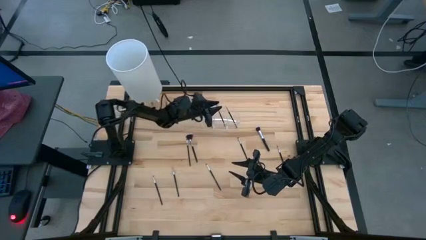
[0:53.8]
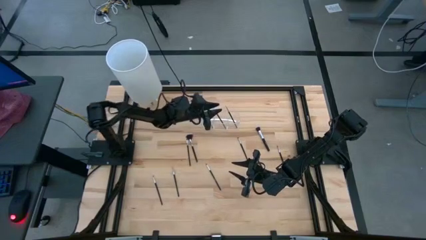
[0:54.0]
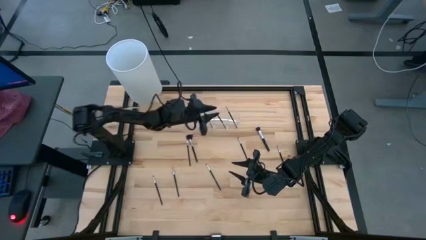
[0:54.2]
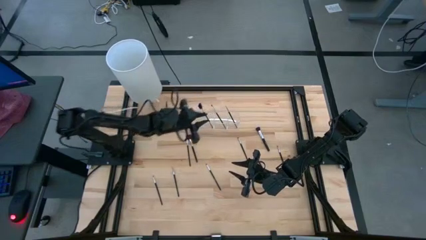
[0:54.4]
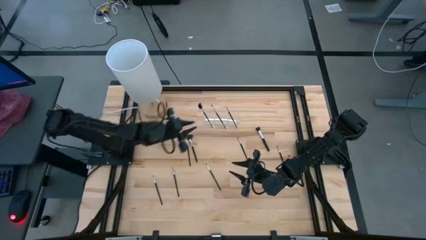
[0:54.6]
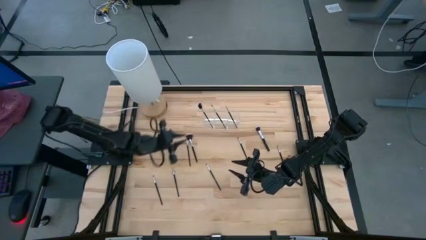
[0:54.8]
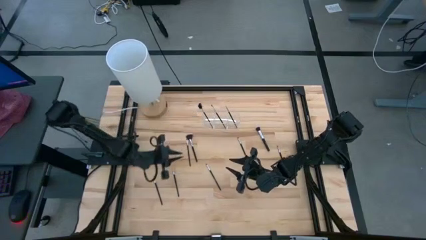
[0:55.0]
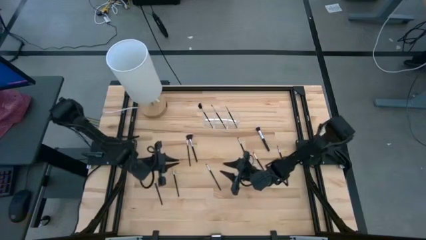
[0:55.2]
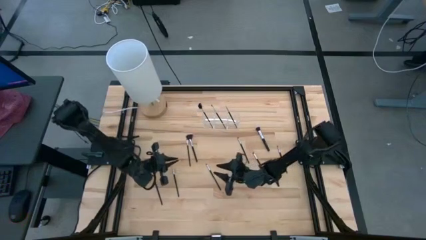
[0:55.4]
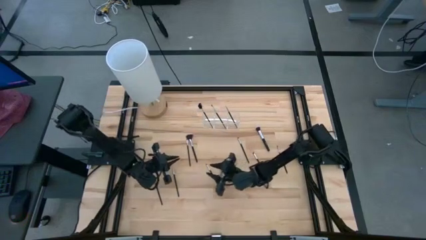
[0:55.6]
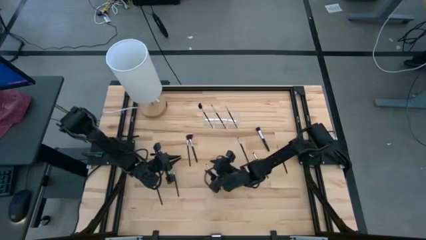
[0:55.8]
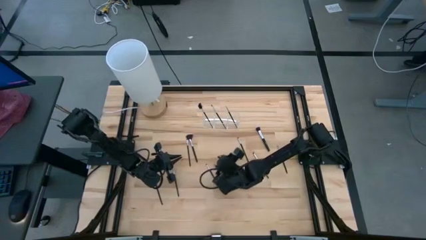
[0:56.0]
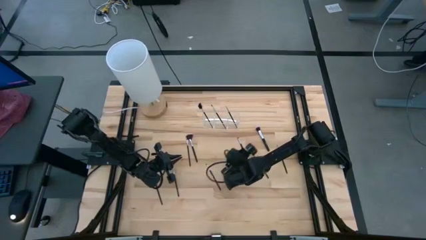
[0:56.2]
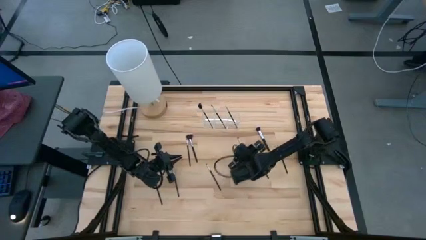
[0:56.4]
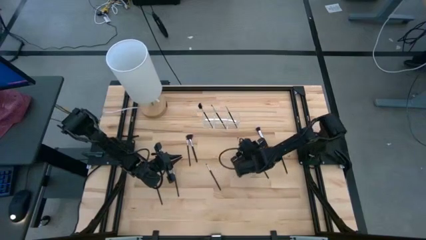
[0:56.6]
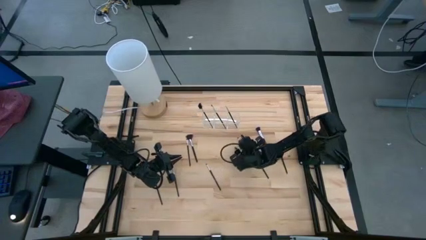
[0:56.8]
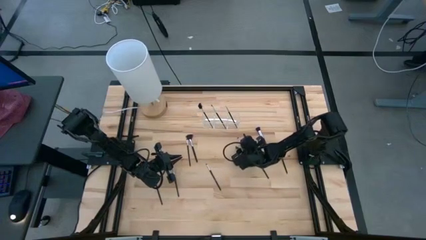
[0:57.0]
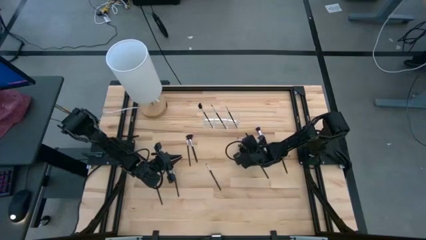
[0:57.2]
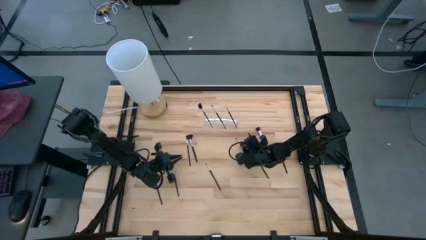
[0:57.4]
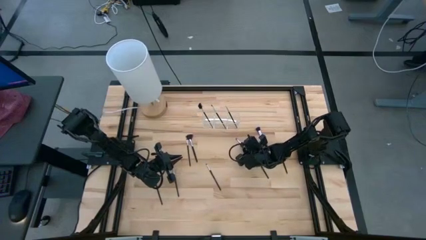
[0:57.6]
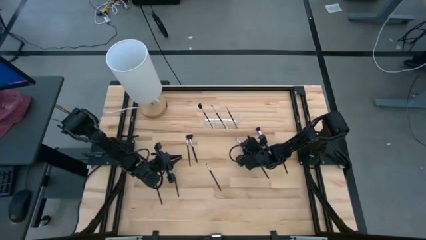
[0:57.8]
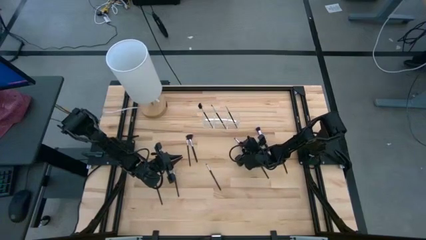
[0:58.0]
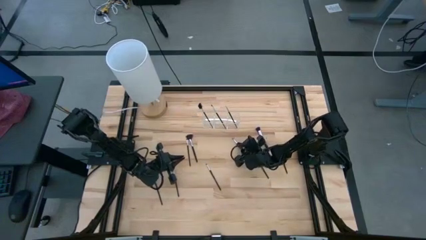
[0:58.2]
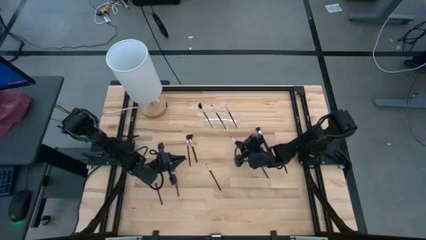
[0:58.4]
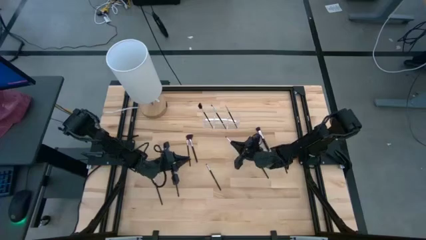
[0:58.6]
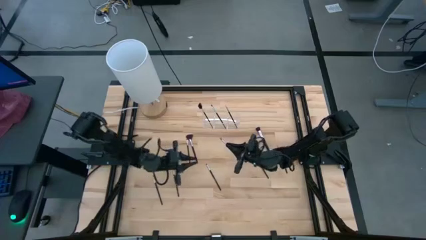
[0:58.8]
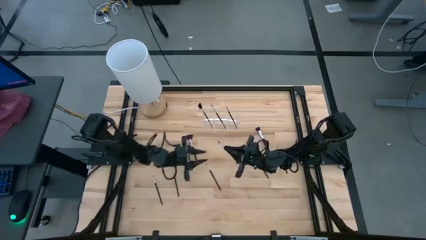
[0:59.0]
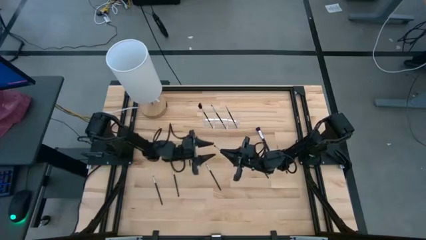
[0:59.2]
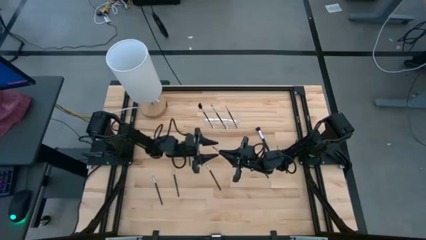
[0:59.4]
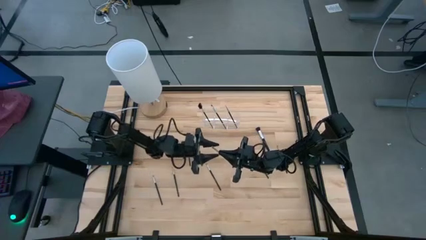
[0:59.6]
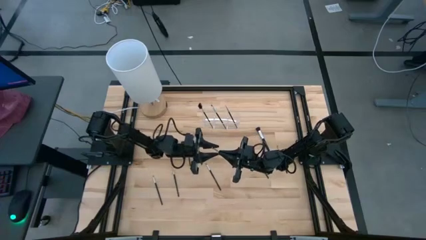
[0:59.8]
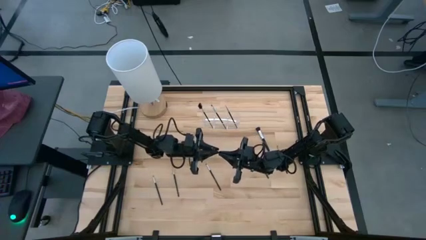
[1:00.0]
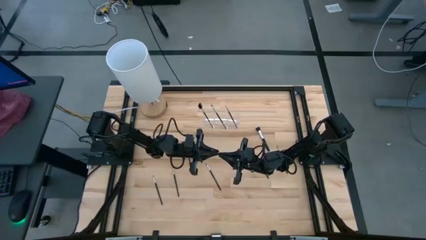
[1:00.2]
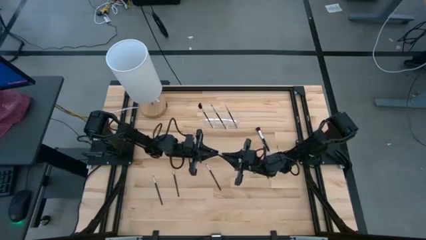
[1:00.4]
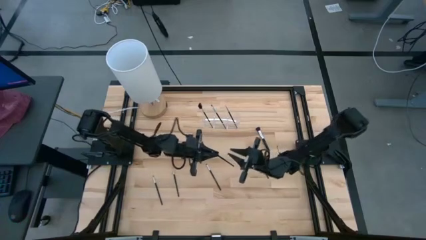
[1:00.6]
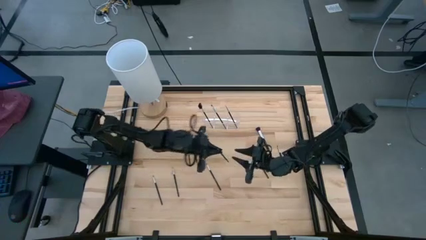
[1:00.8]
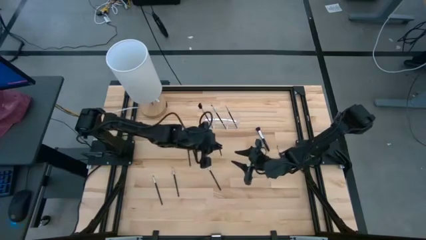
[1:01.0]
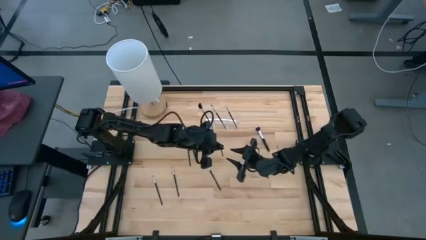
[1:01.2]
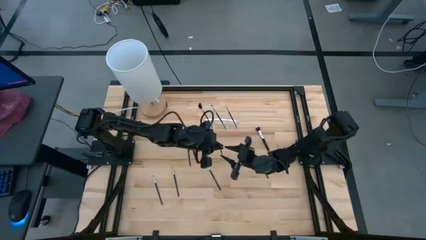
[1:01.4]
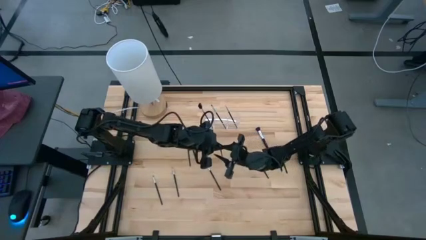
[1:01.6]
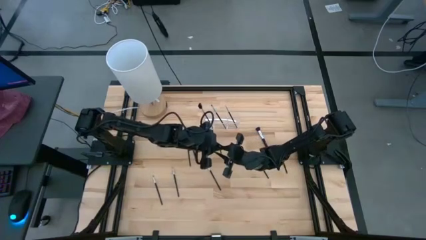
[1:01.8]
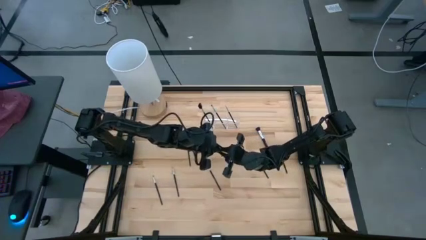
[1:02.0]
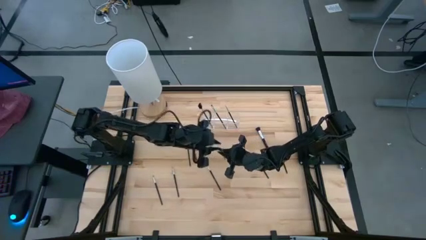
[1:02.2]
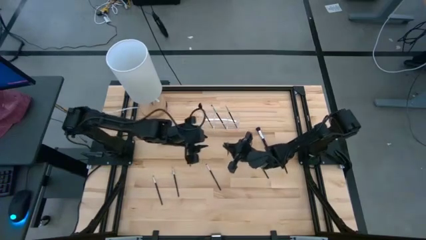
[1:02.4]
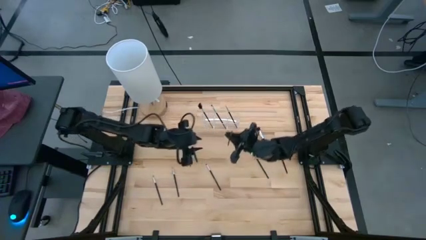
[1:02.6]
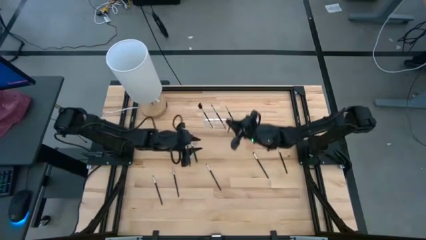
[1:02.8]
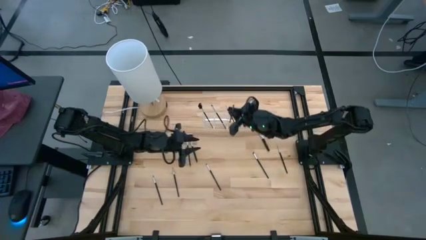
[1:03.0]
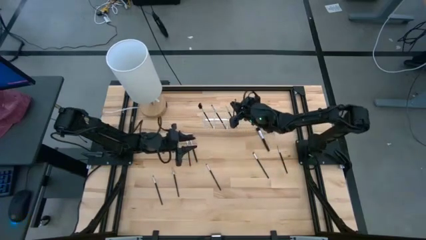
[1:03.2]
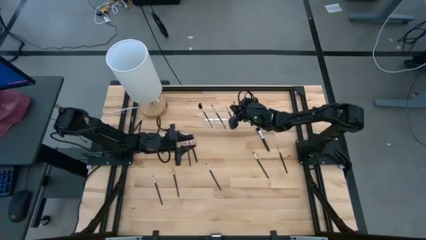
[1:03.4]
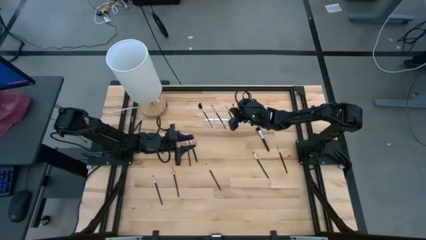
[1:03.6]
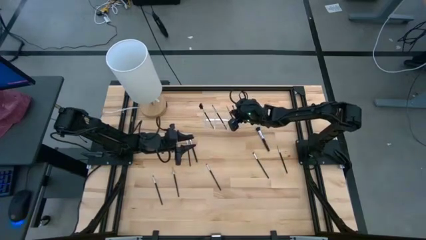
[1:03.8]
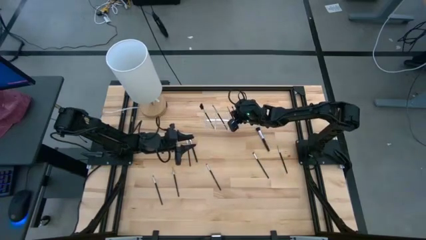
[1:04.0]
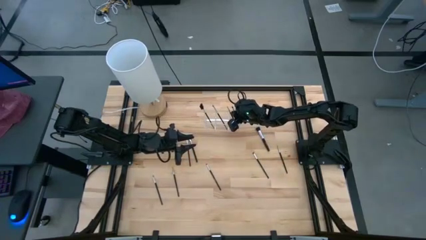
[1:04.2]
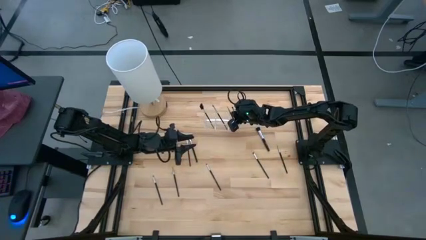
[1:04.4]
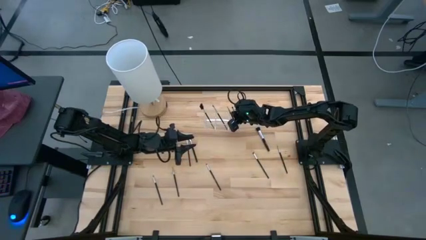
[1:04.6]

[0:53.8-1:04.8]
Task: Put items in baskets/containers
Put the black eyeshadow brush into the transparent organizer

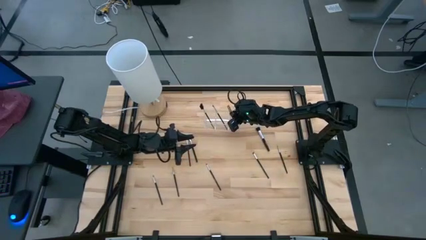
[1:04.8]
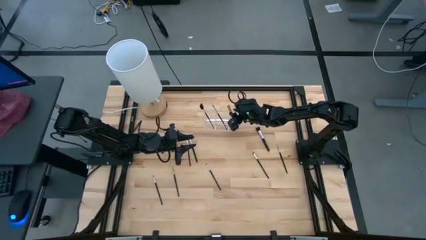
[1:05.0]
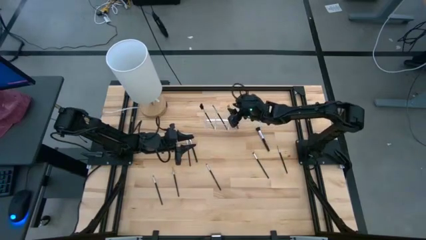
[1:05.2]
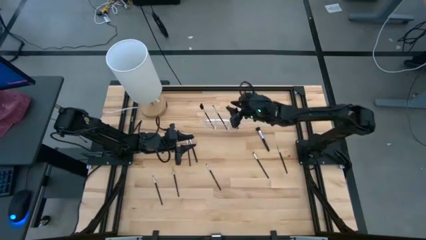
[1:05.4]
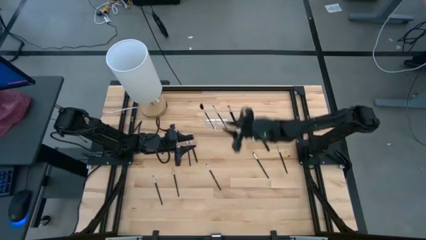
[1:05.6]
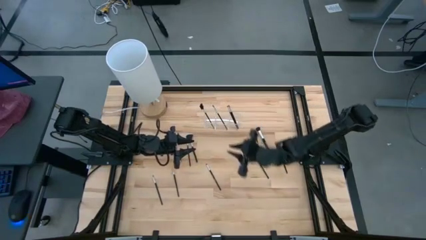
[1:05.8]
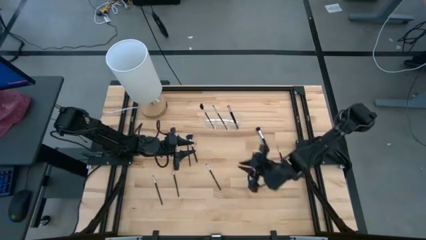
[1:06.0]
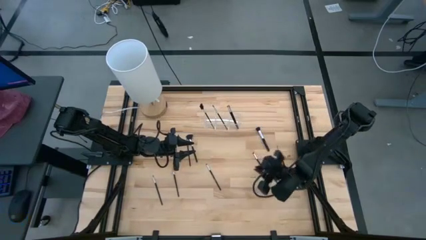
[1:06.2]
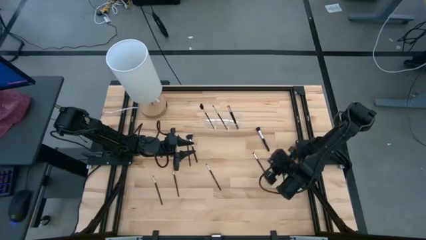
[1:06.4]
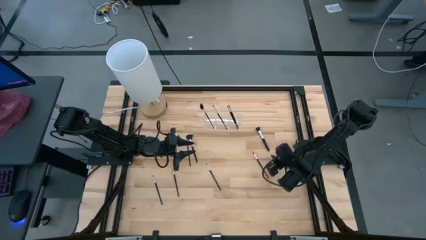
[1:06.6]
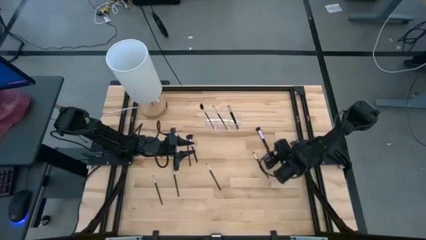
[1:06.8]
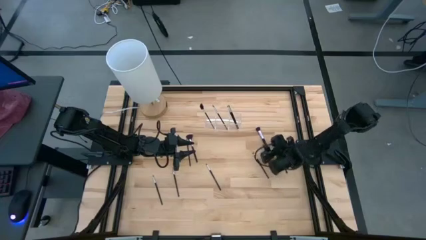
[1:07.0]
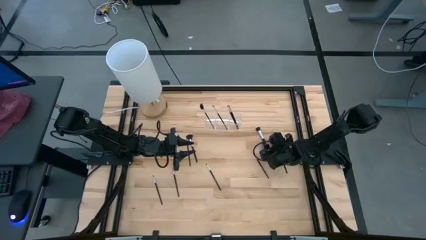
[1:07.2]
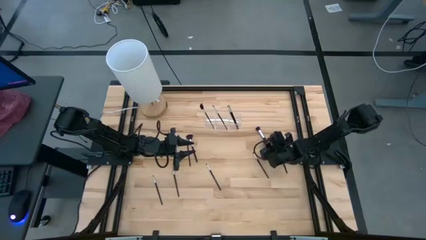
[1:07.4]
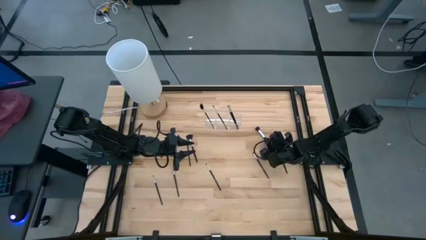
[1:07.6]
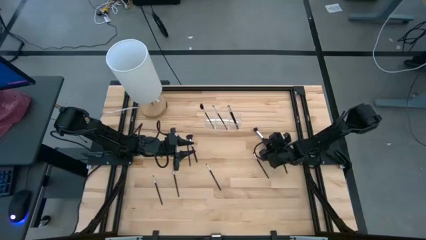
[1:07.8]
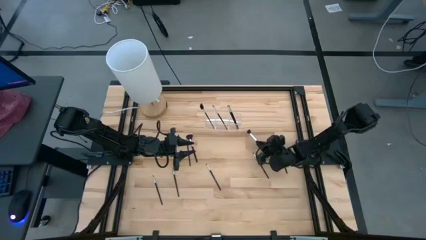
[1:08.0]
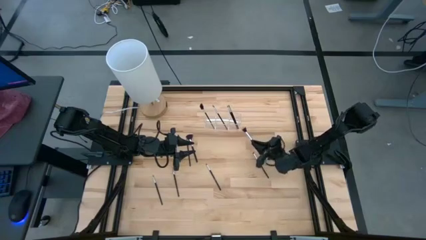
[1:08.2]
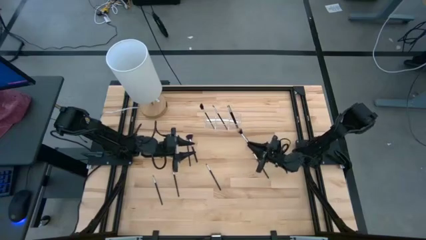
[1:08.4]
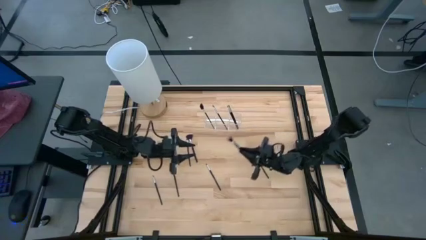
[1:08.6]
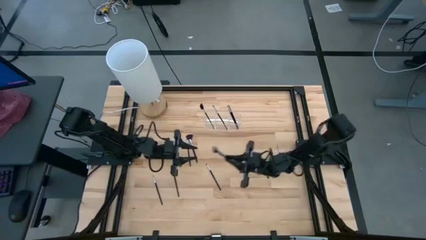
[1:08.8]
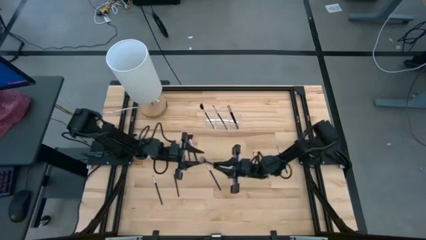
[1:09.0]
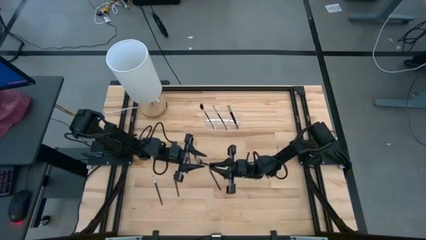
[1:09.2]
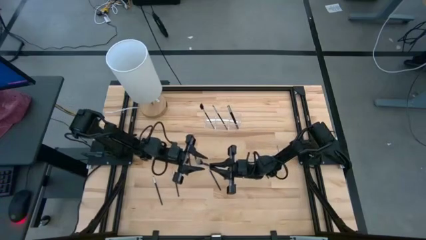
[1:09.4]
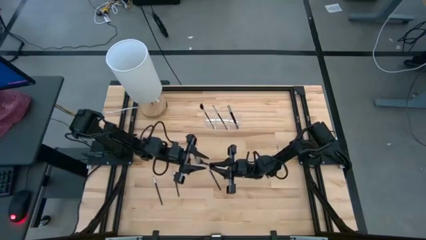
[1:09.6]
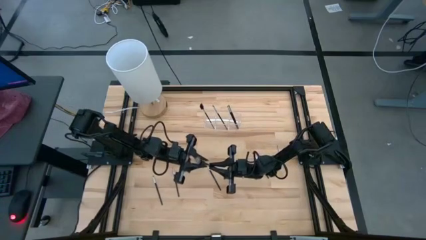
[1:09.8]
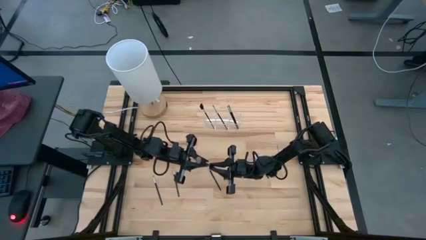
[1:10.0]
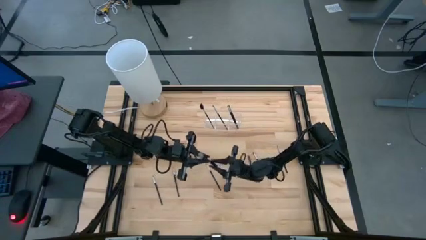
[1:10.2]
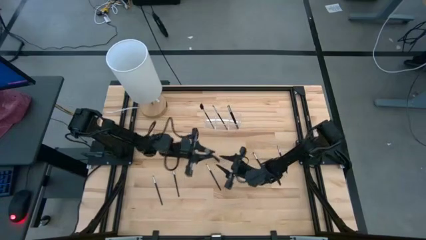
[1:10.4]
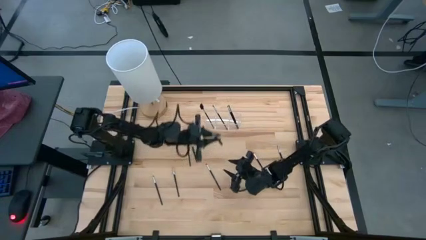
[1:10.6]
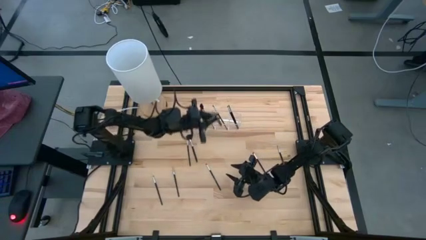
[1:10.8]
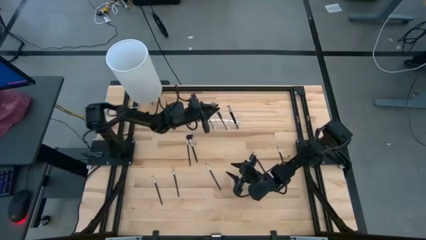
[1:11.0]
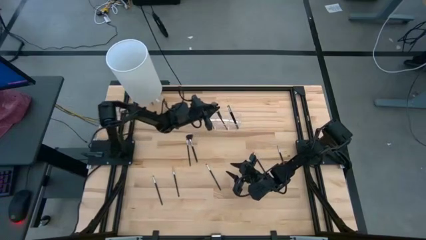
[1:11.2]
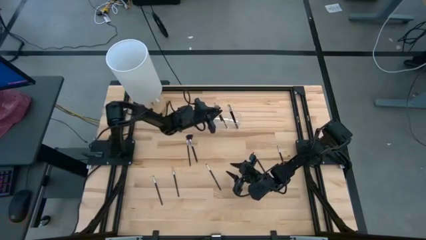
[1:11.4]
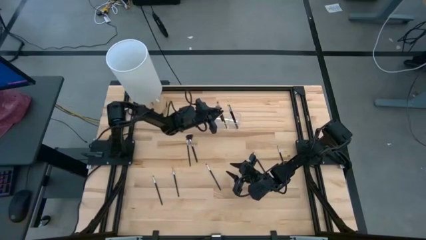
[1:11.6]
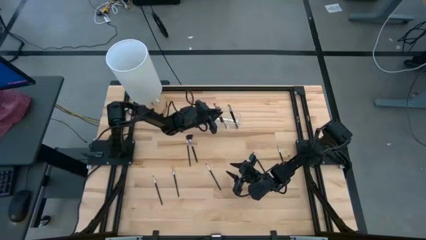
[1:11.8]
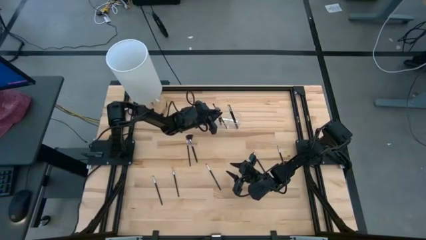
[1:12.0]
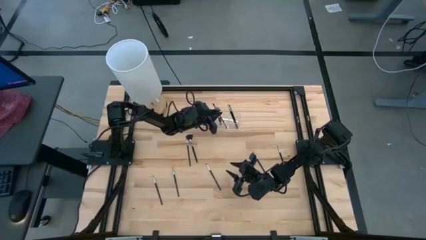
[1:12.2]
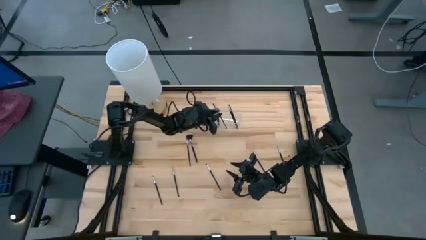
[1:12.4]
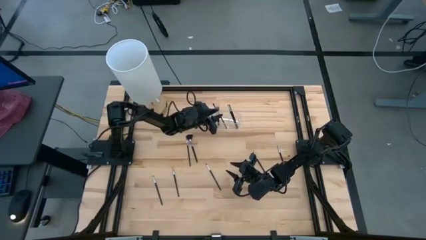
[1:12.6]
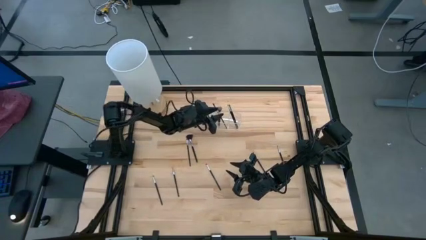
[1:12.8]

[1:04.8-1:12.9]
Put the black powder brush into the transparent organizer
